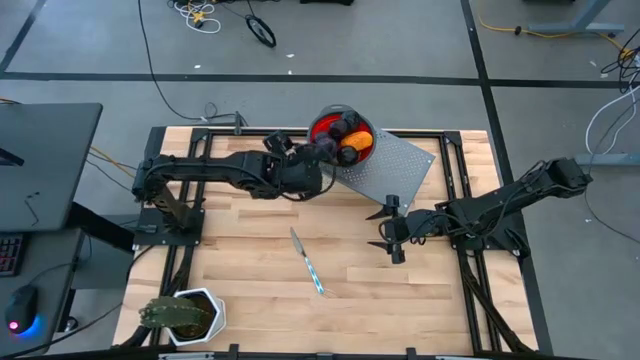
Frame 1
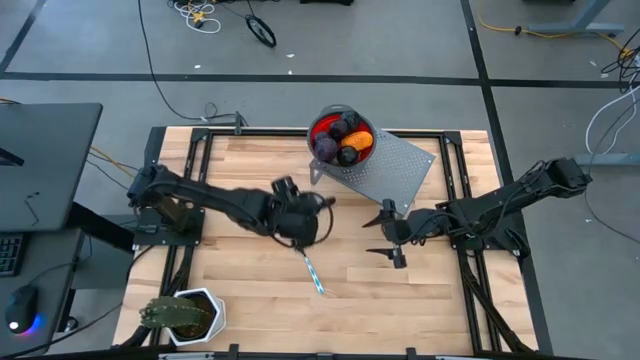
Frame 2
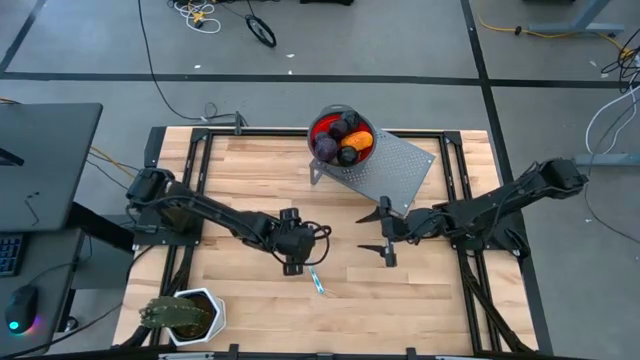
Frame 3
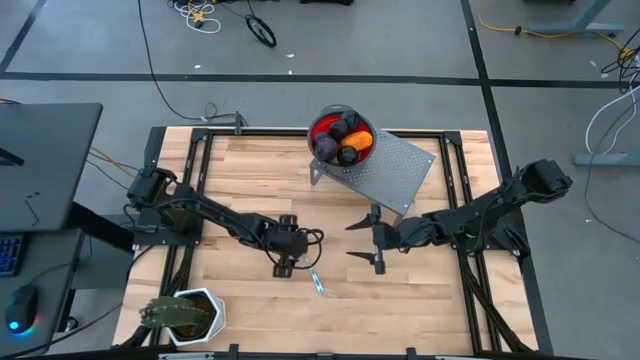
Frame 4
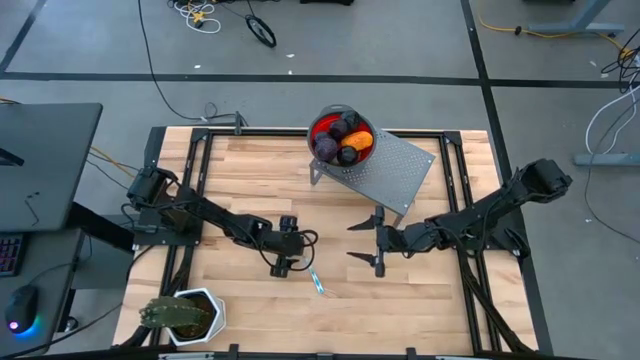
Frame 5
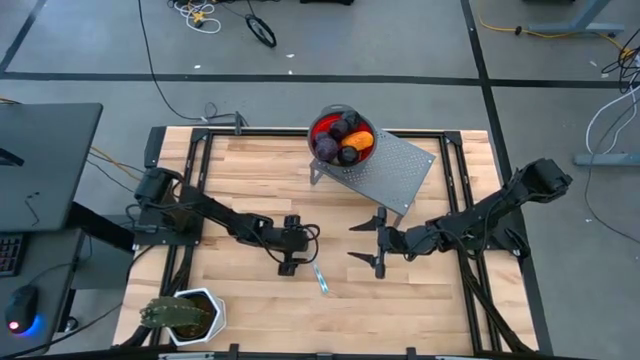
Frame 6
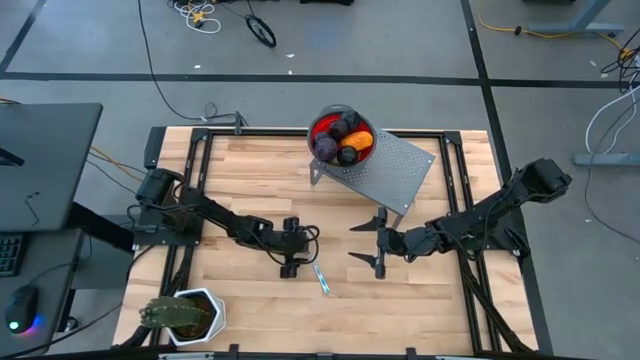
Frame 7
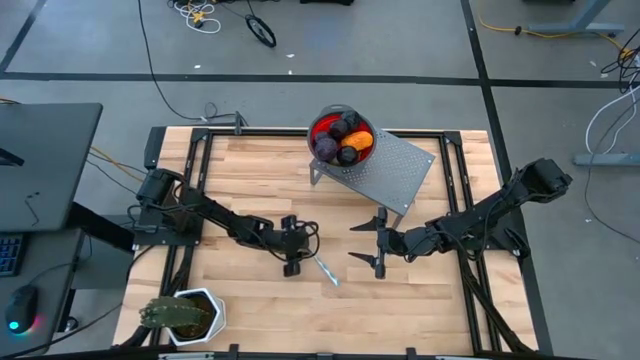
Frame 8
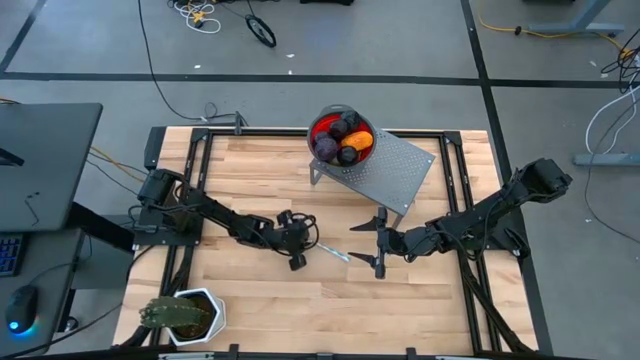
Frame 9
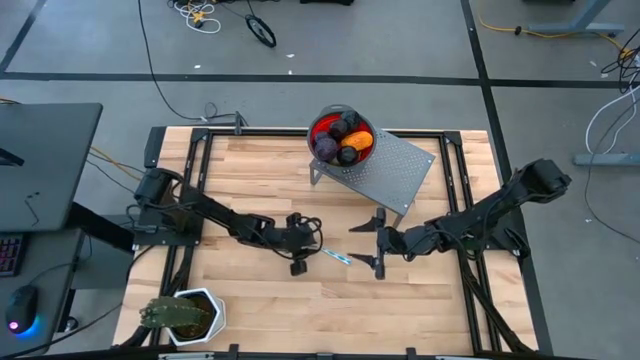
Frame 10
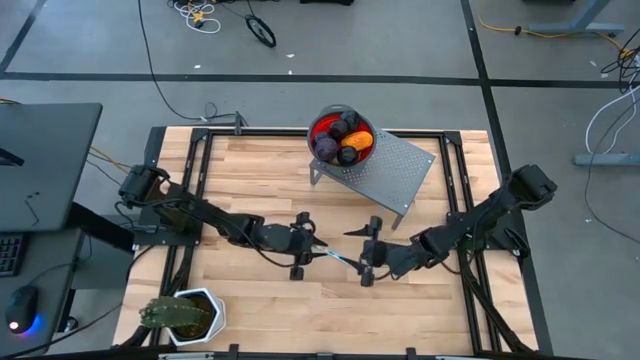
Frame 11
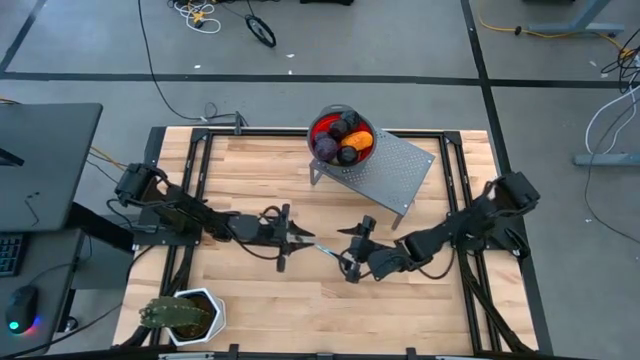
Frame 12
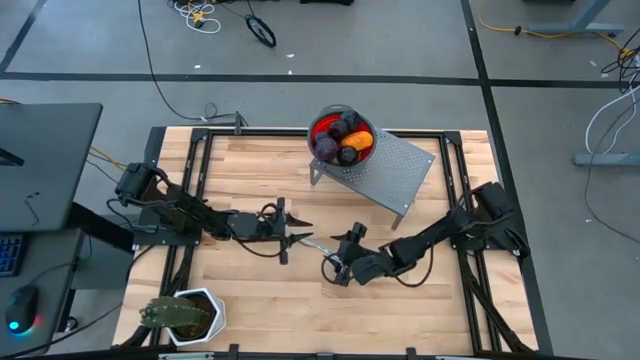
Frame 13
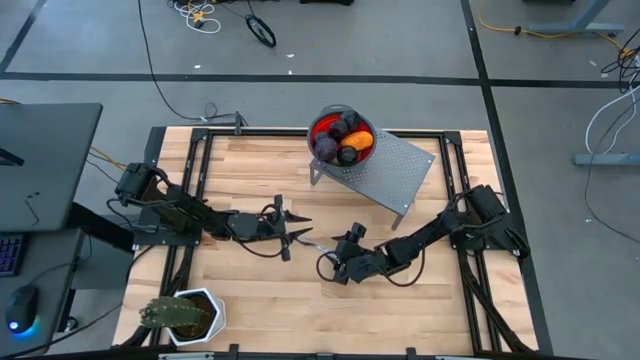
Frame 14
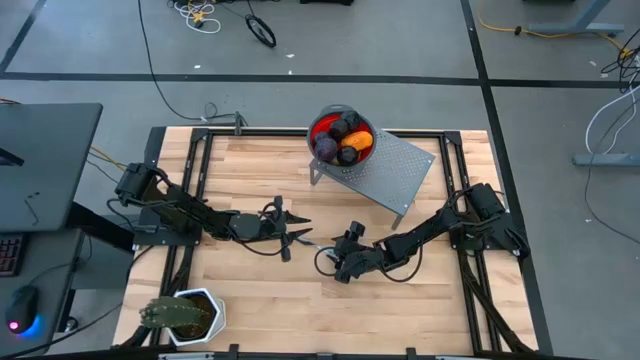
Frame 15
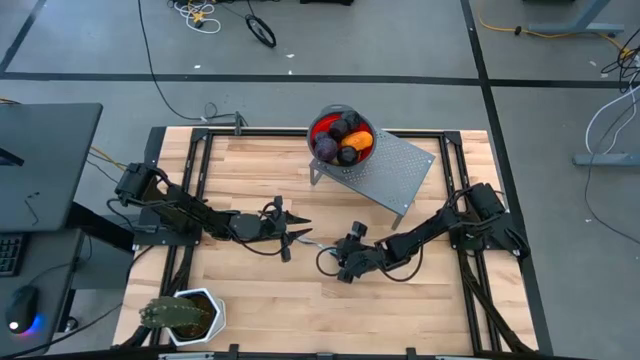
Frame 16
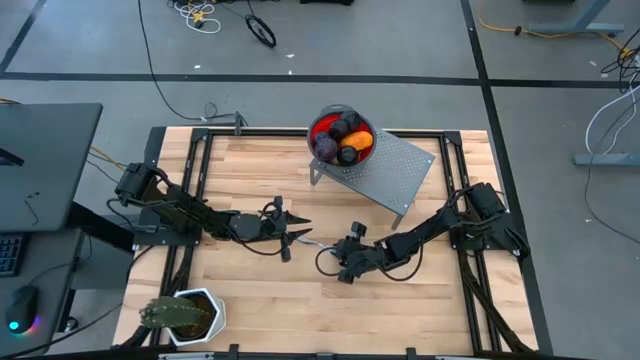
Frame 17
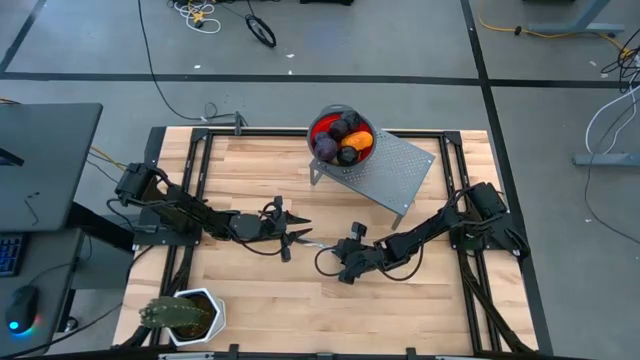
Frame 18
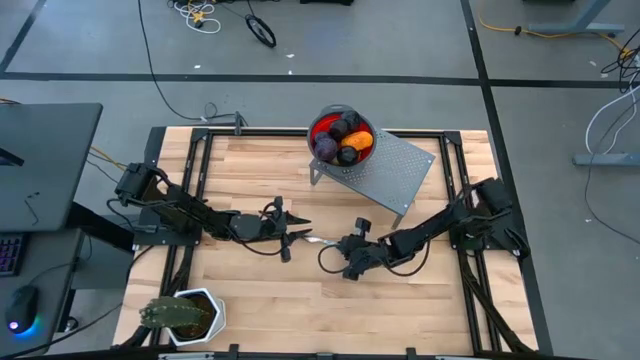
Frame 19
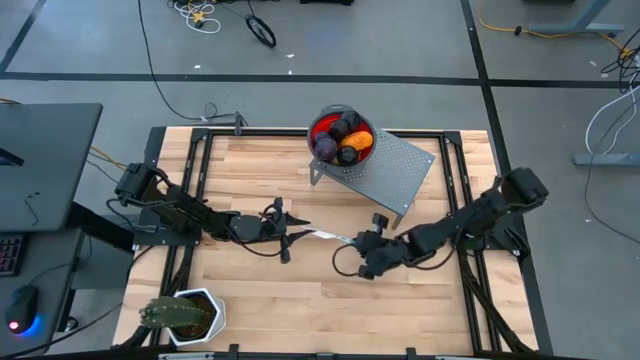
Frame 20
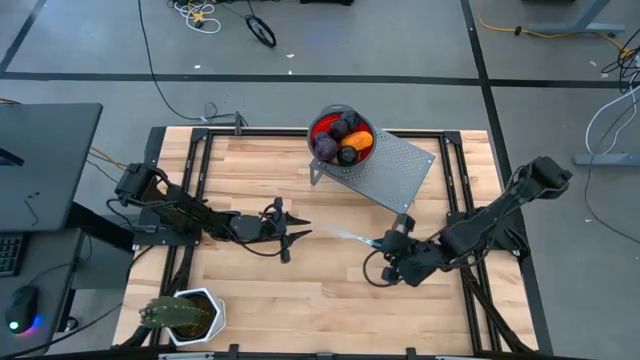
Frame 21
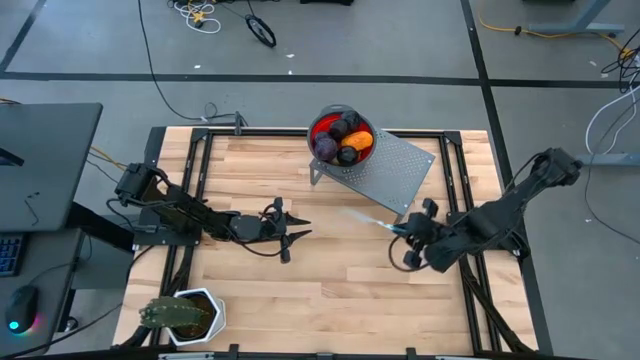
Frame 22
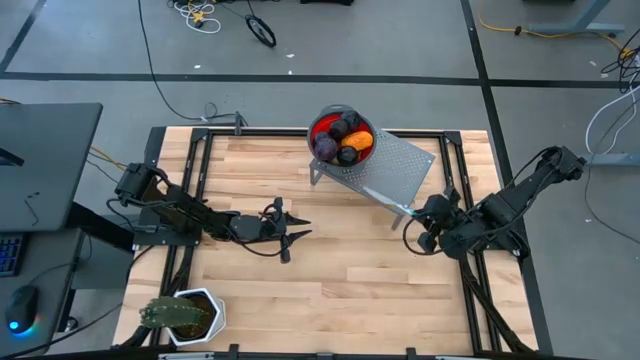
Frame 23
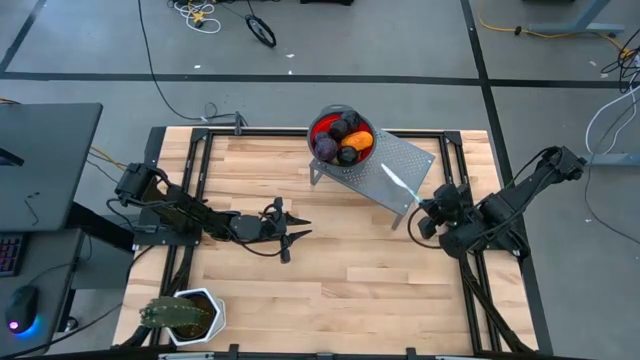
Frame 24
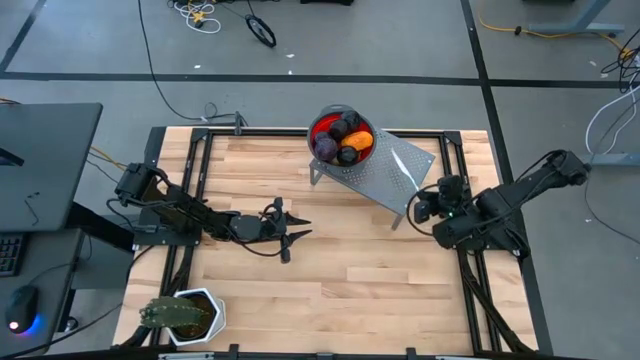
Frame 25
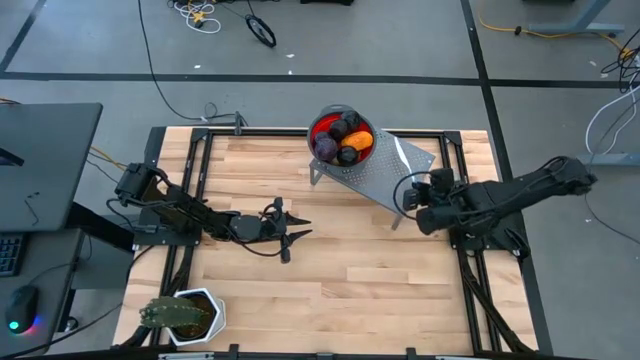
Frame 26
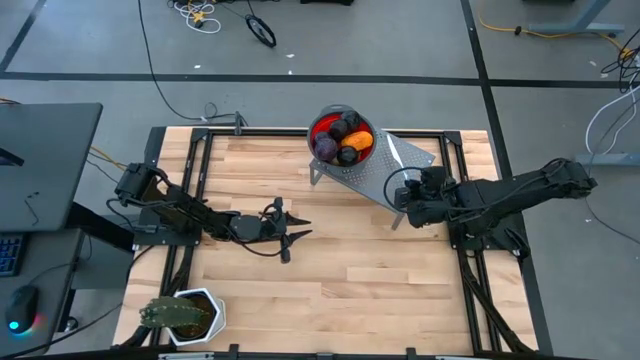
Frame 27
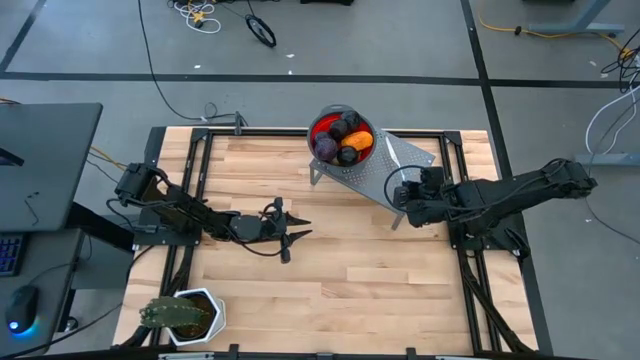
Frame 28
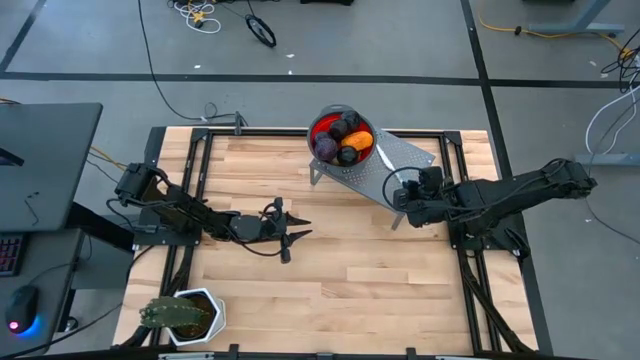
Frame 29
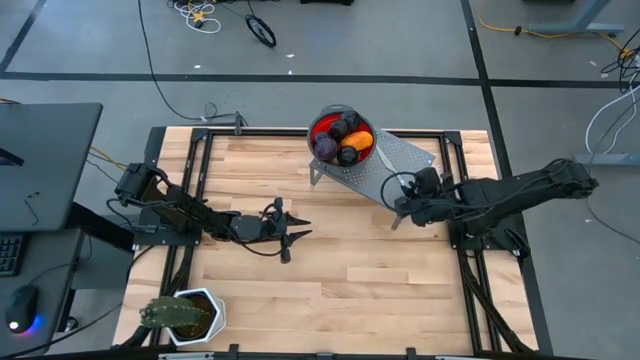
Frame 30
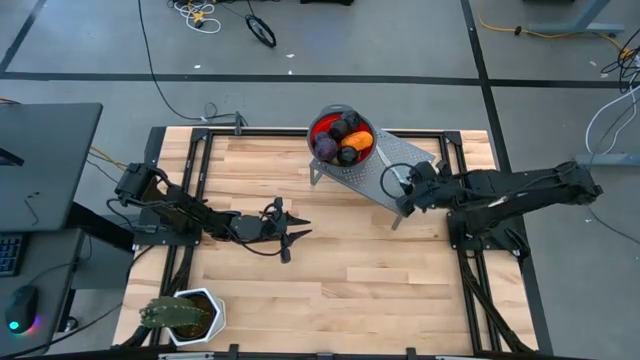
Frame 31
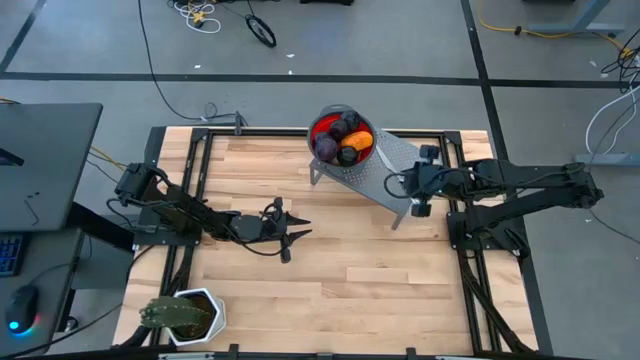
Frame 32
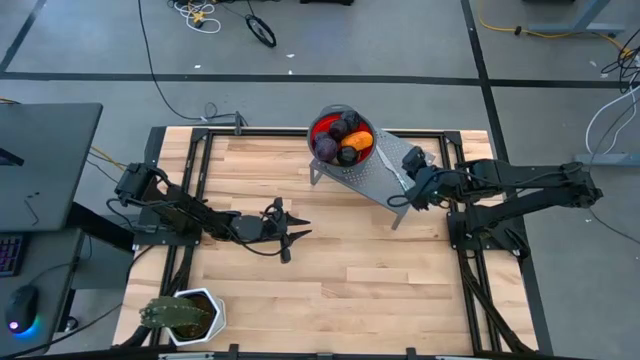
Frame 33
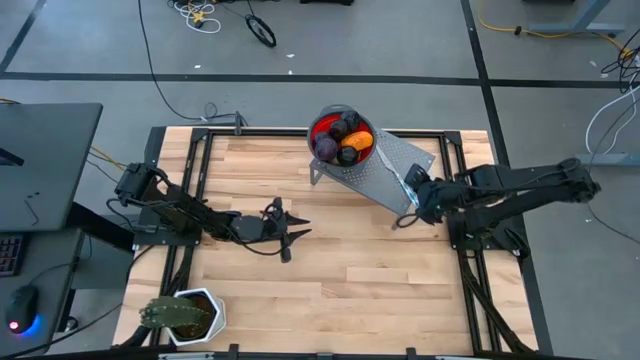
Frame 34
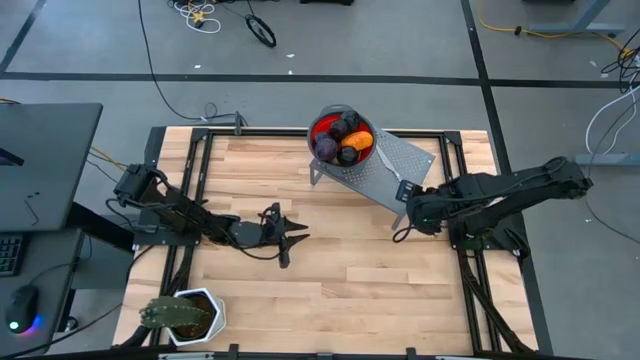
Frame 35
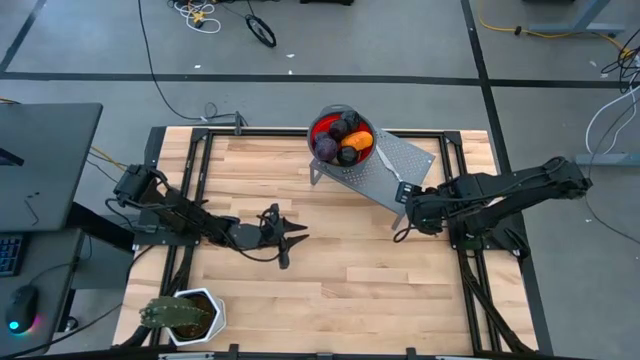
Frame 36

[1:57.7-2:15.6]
Task: Pick & Place Fruit
Put the knife on the shelf

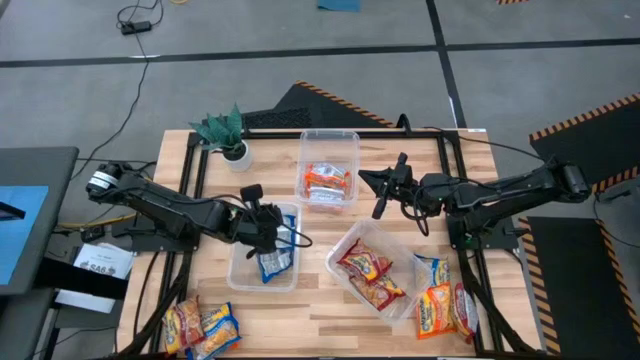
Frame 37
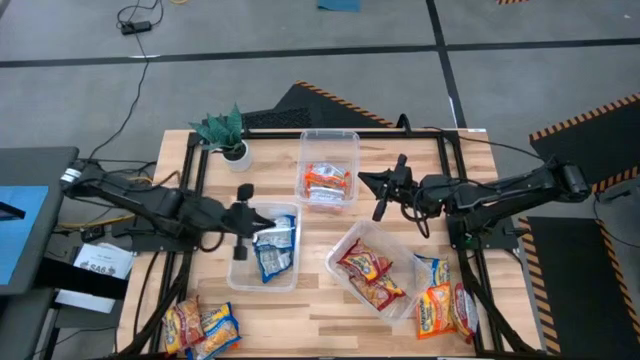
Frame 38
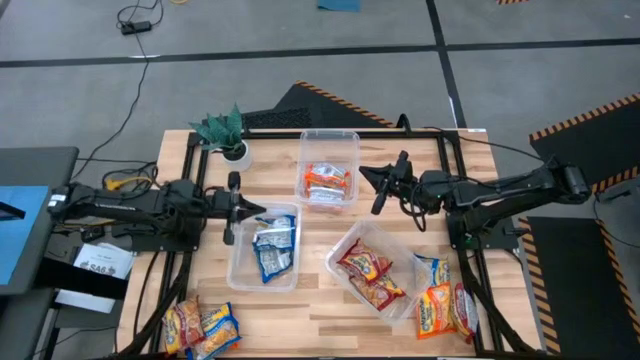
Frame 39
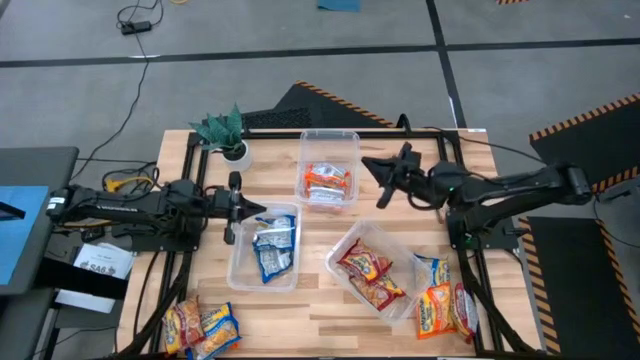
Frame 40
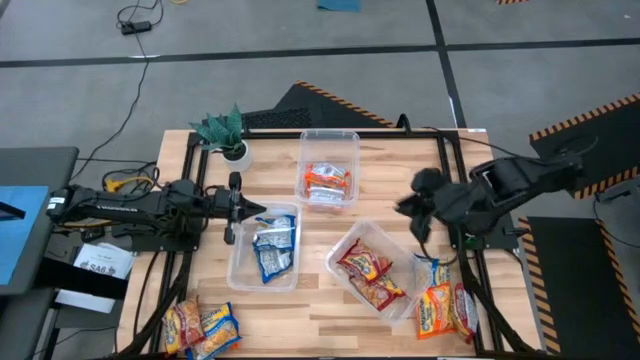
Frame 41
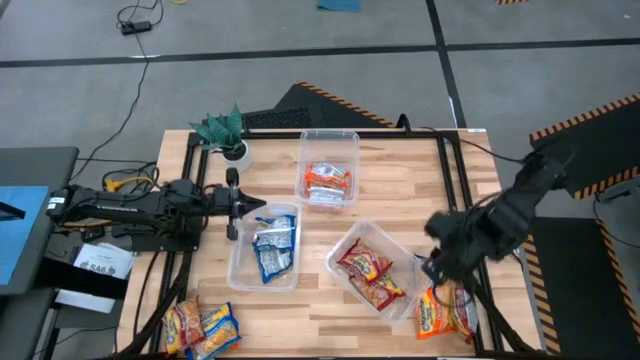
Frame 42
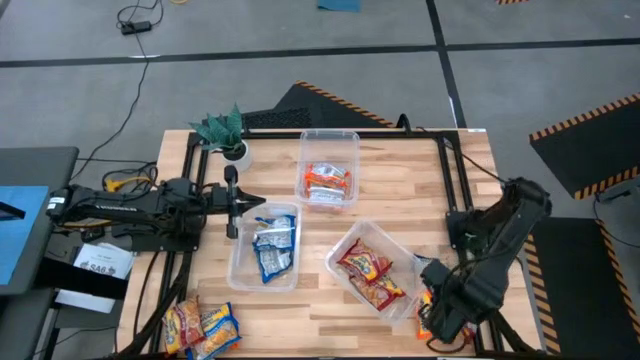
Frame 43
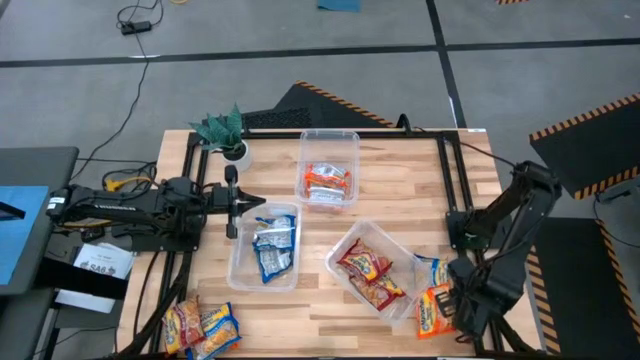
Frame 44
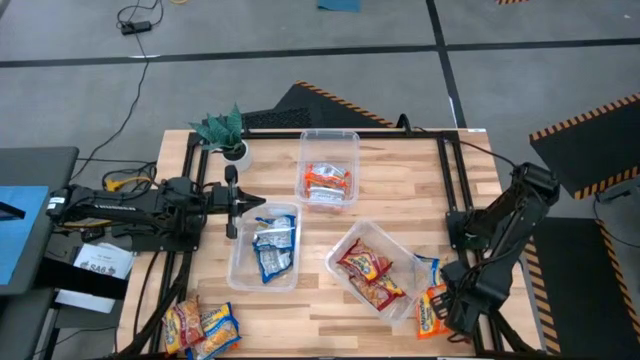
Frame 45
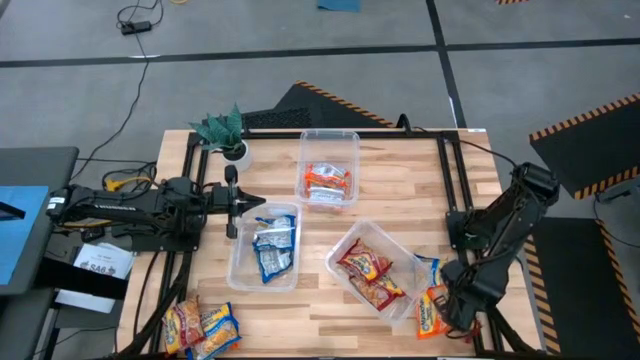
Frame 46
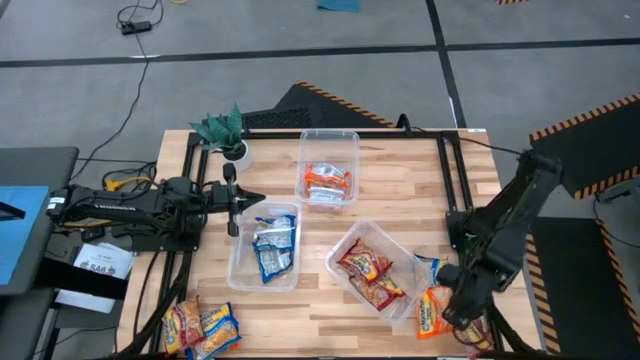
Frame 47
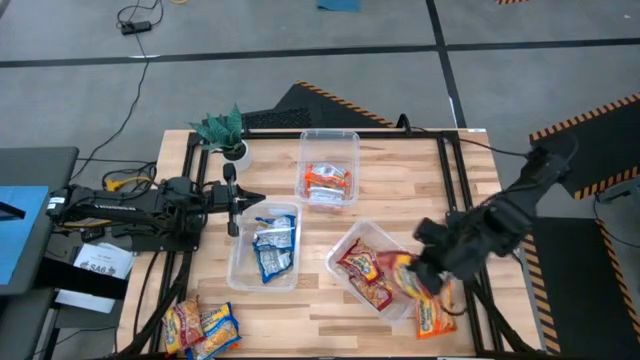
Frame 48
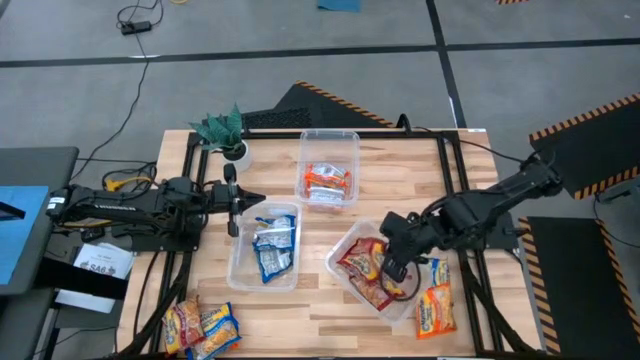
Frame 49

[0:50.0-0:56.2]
Task: Sort Maruchan noodles
Put the red noodle pack in the bottom right transparent bin
